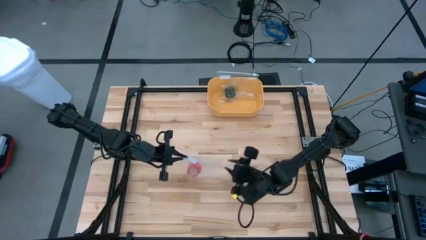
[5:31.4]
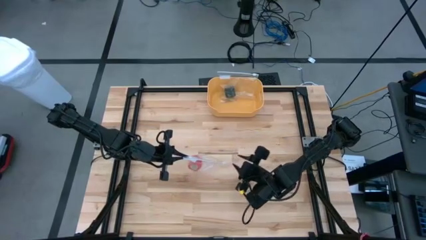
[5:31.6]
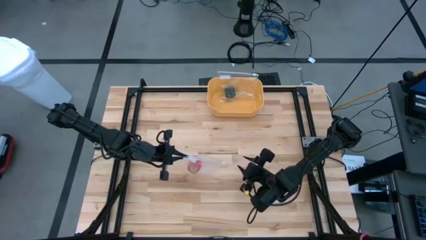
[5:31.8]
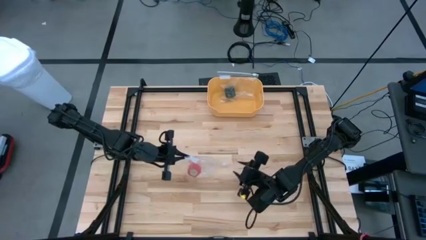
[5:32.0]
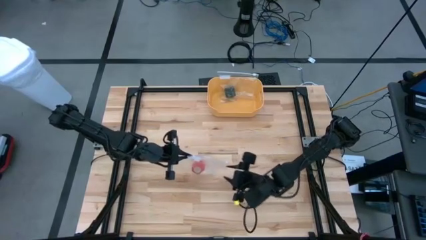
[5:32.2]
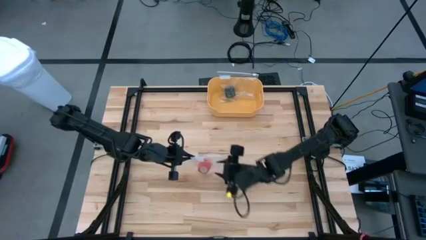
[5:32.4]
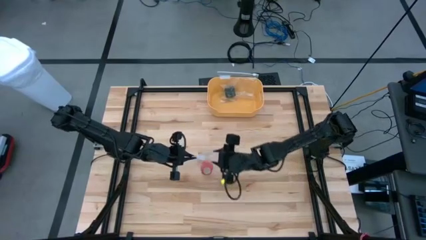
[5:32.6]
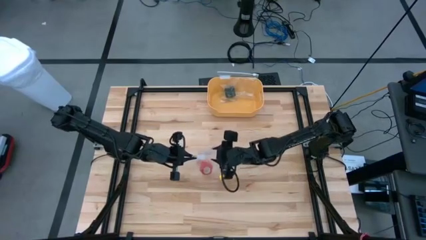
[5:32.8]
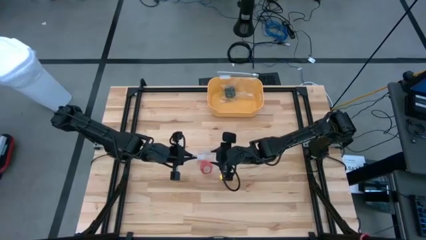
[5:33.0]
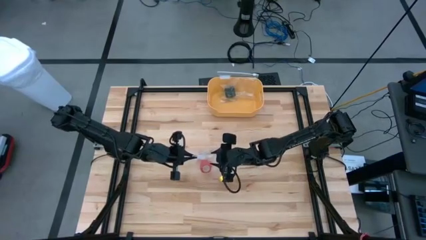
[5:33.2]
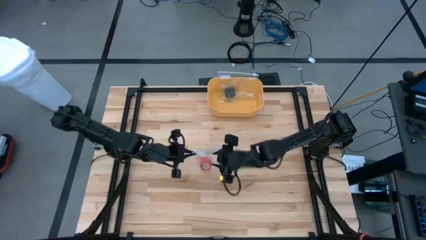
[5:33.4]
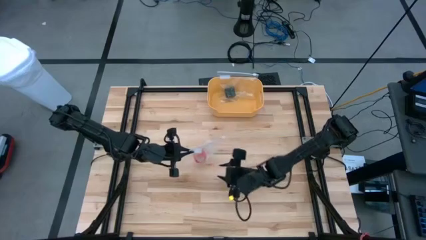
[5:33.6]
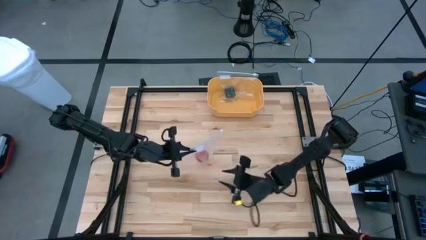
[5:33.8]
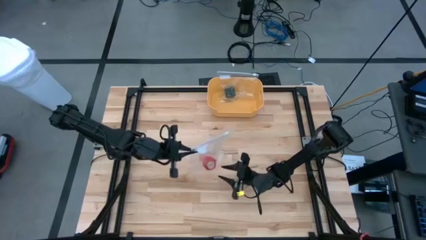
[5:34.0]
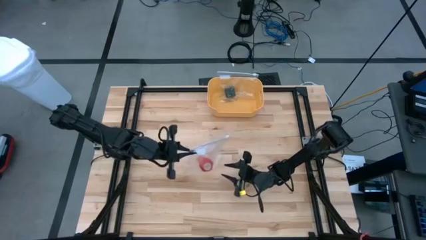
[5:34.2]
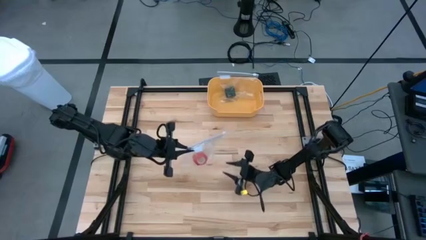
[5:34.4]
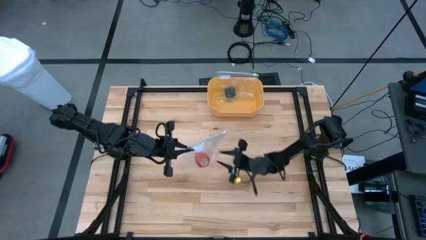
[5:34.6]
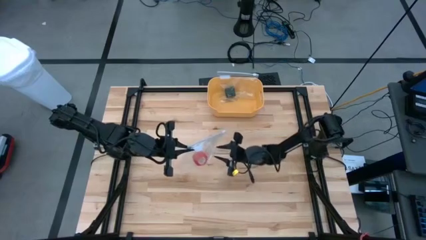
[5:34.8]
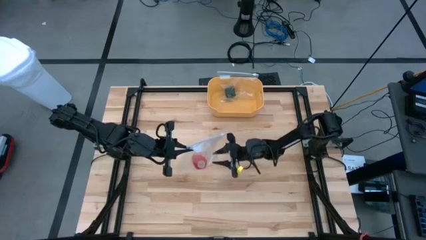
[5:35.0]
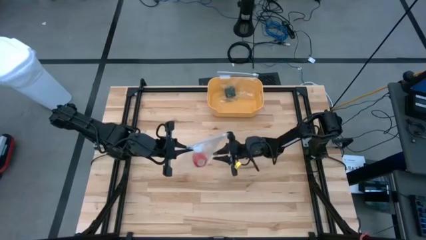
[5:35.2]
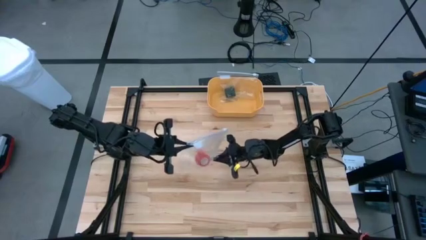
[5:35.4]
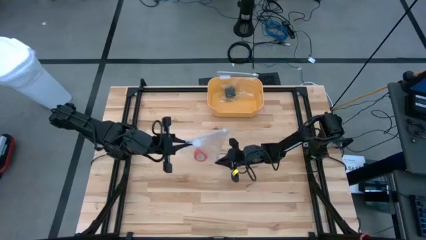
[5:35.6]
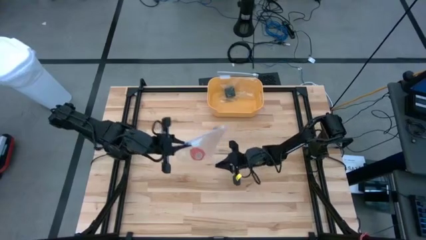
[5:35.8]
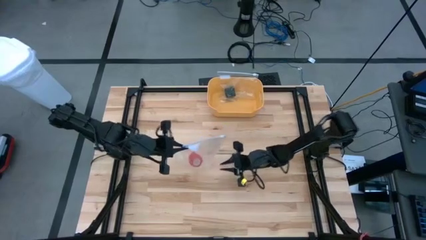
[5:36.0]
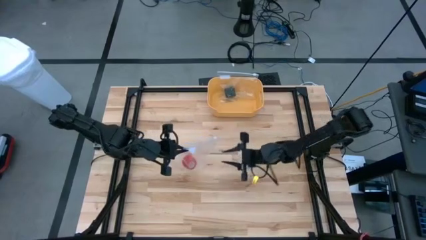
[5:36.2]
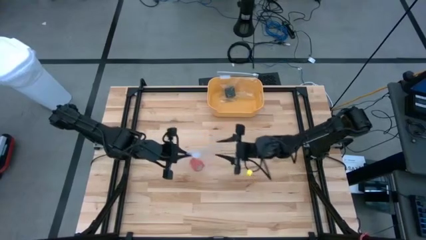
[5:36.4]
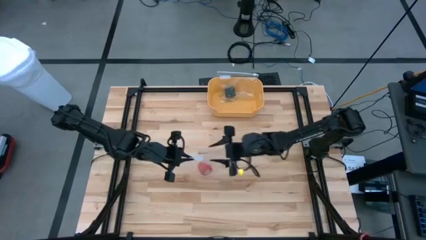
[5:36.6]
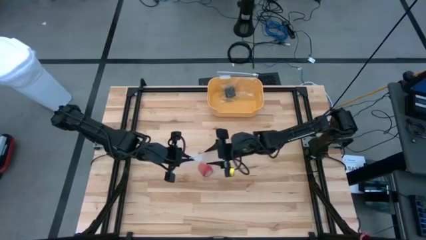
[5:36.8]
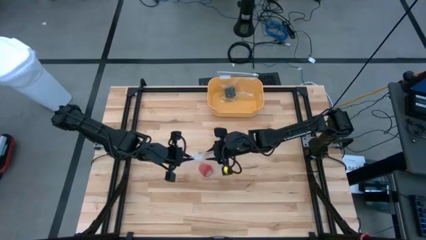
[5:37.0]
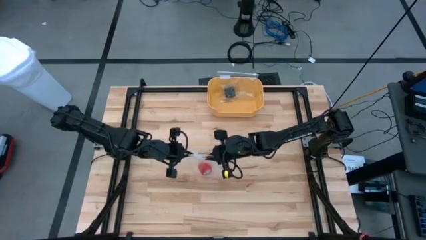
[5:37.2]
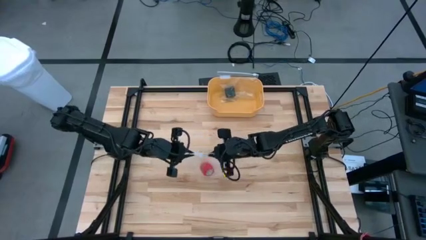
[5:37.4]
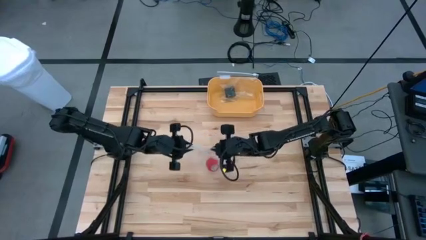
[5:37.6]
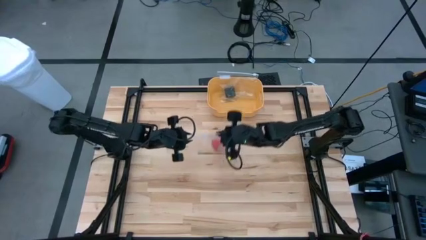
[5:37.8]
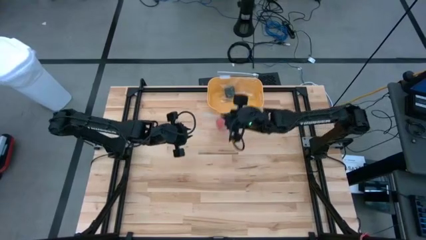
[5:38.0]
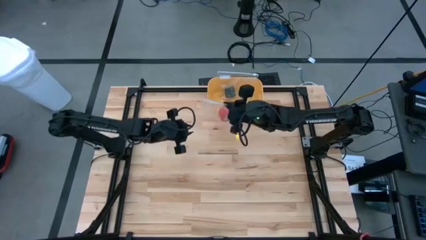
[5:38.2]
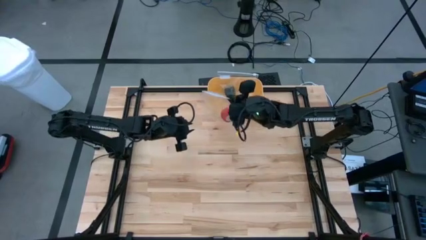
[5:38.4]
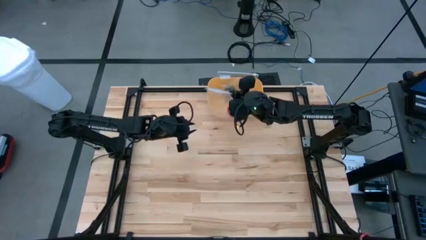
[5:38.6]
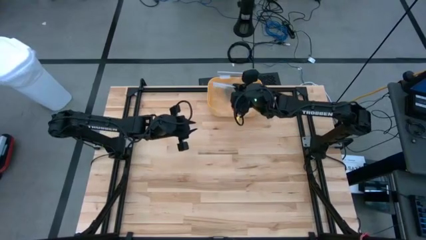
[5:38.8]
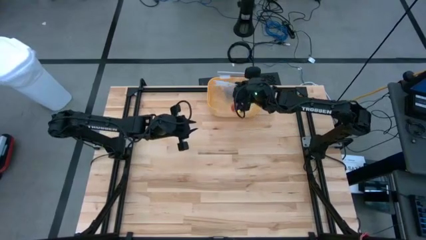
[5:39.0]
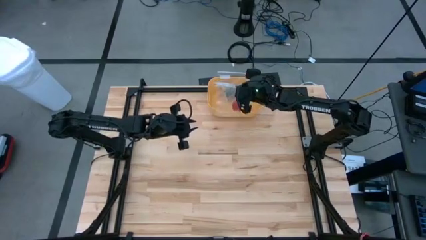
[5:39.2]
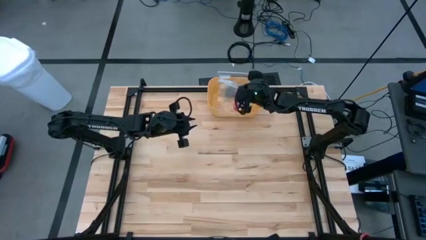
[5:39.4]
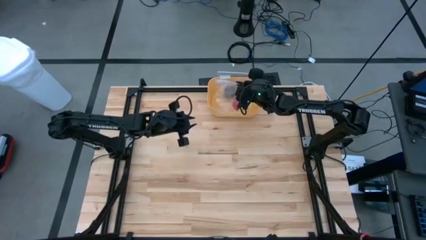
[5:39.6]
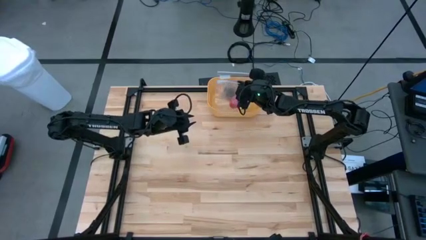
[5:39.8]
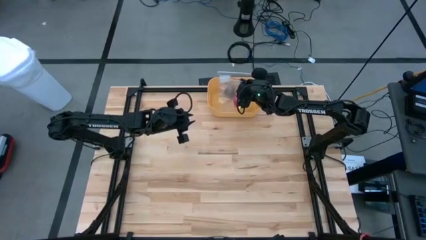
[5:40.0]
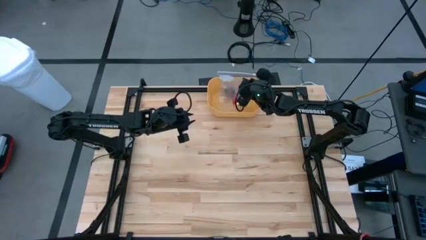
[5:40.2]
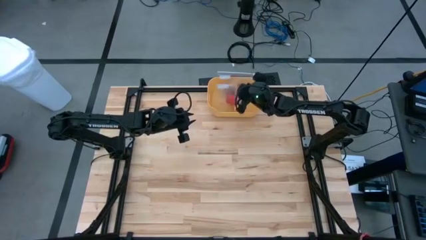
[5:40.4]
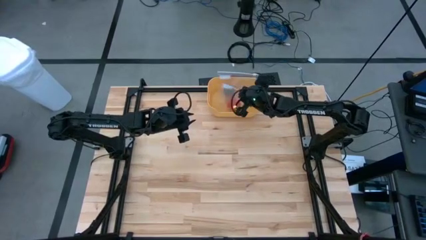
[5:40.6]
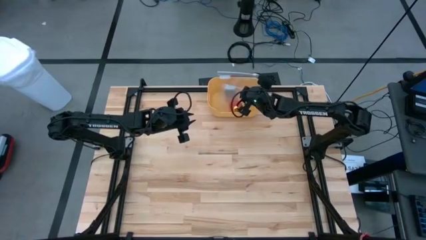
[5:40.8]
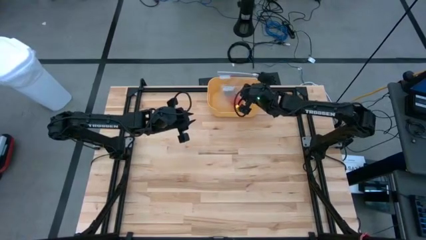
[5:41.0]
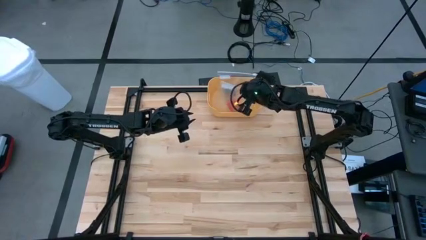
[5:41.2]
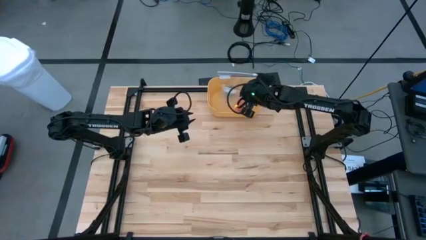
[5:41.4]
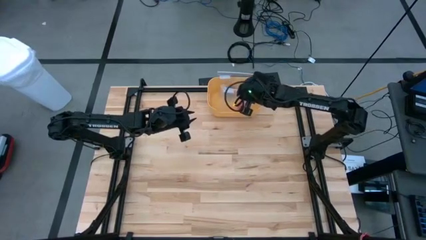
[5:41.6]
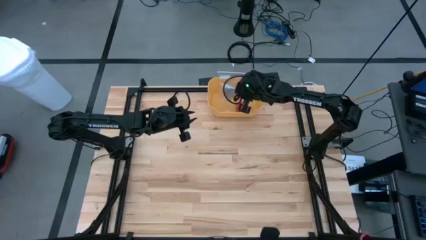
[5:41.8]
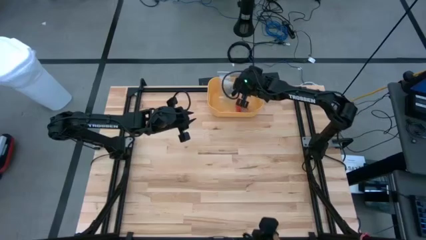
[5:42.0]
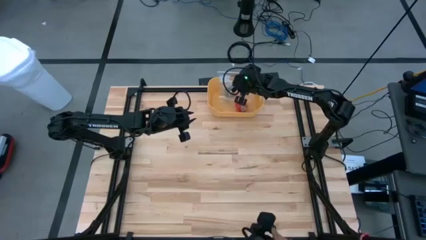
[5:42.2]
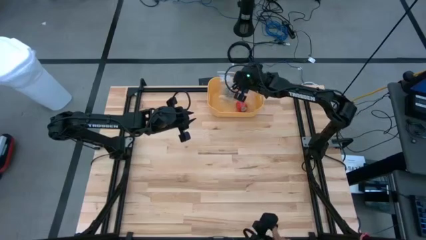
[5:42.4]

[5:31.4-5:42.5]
Task: Roll bandage
Put the transparent zip bag into the yellow bin
